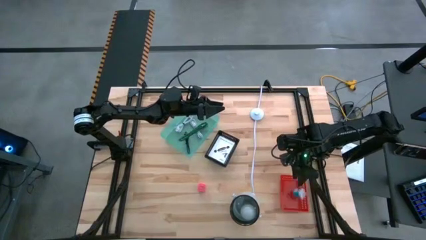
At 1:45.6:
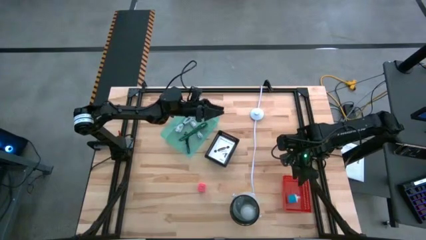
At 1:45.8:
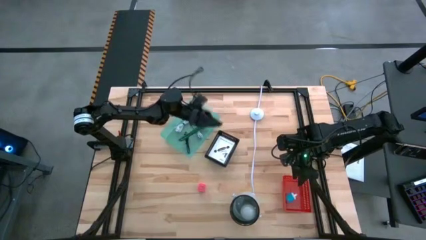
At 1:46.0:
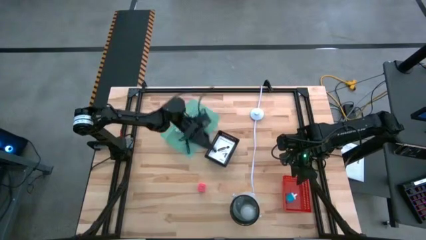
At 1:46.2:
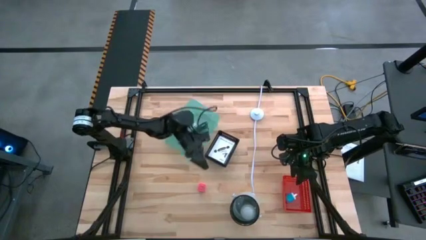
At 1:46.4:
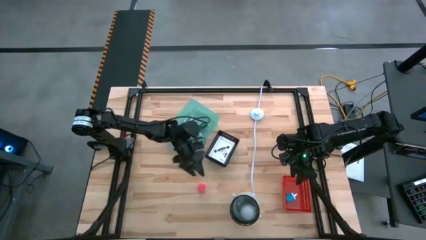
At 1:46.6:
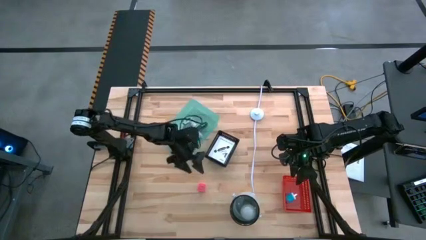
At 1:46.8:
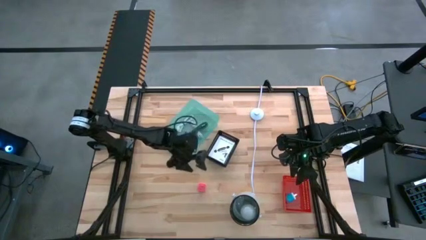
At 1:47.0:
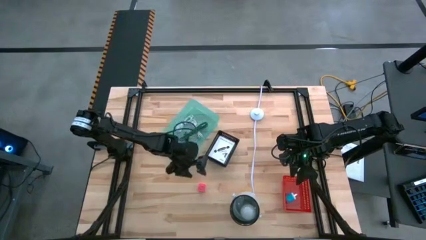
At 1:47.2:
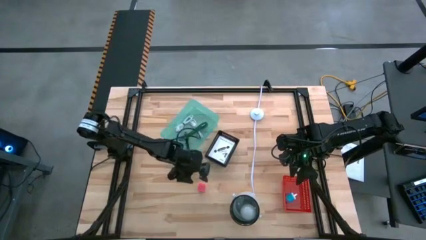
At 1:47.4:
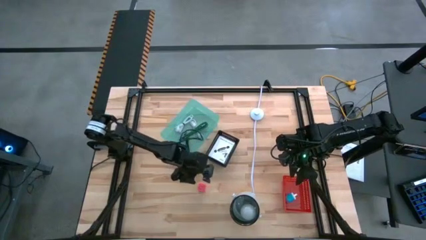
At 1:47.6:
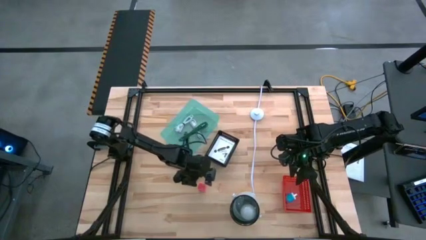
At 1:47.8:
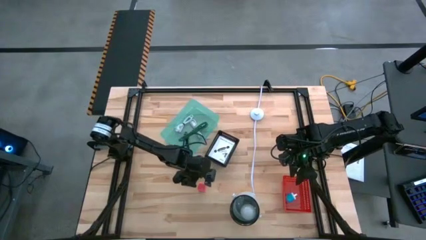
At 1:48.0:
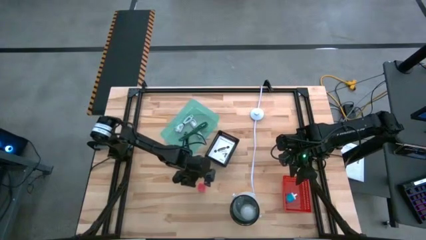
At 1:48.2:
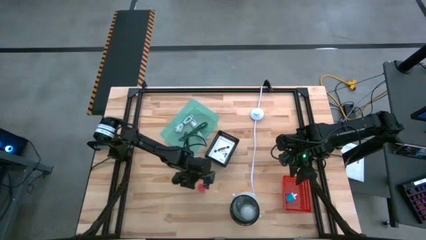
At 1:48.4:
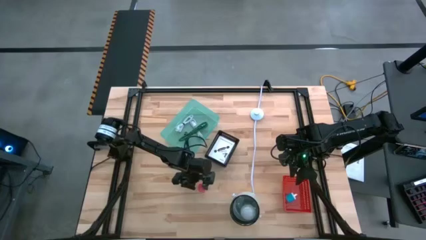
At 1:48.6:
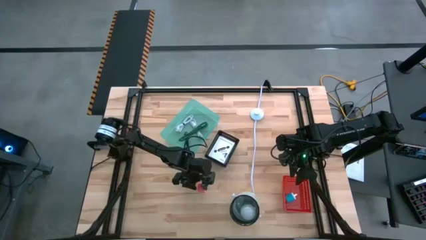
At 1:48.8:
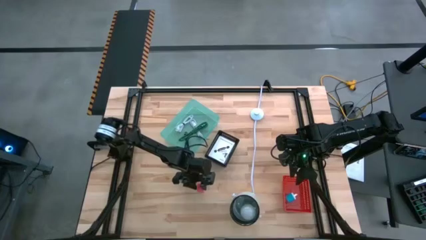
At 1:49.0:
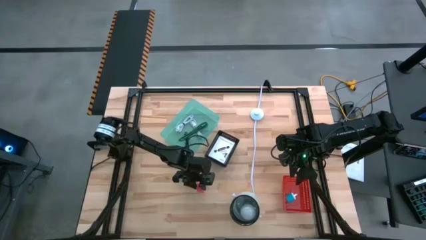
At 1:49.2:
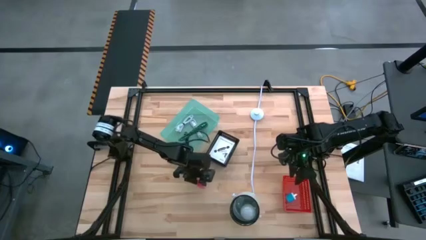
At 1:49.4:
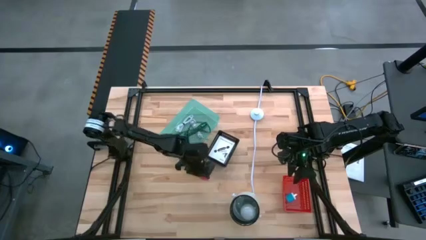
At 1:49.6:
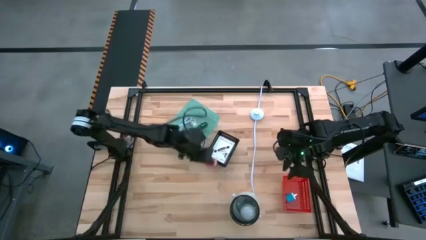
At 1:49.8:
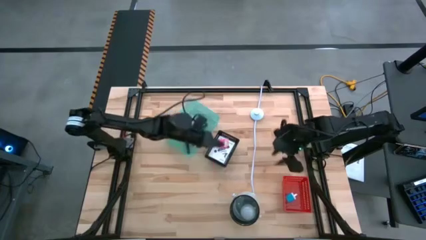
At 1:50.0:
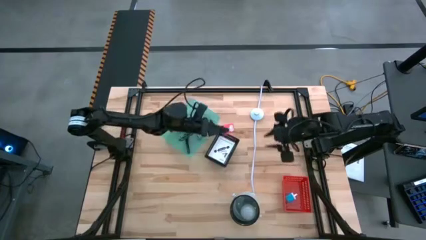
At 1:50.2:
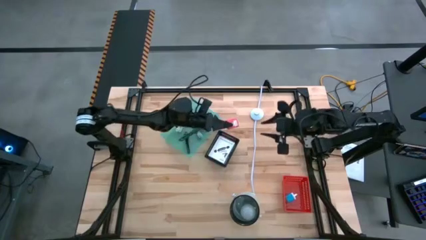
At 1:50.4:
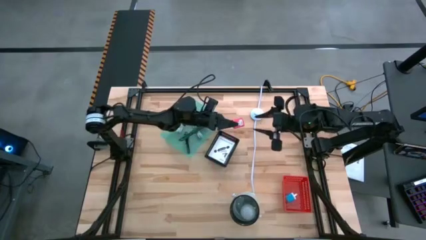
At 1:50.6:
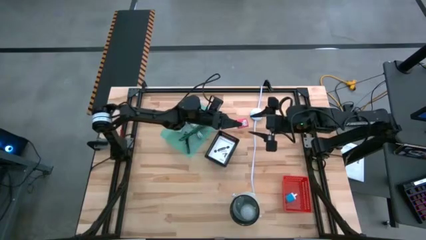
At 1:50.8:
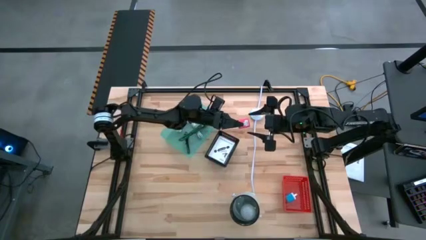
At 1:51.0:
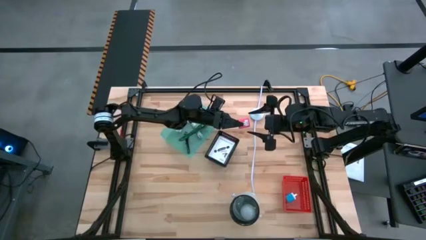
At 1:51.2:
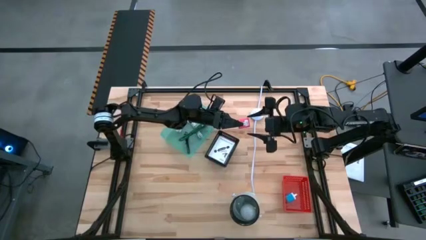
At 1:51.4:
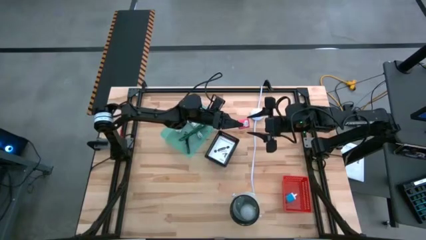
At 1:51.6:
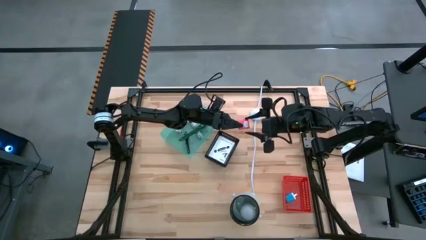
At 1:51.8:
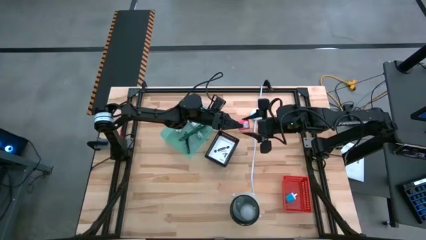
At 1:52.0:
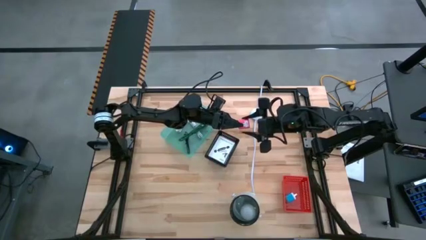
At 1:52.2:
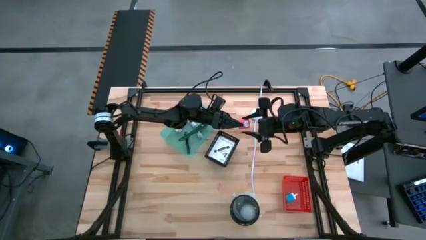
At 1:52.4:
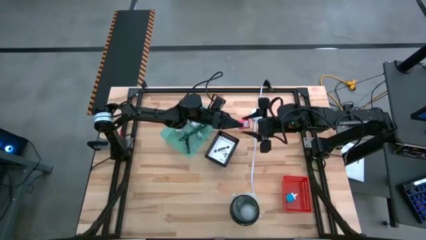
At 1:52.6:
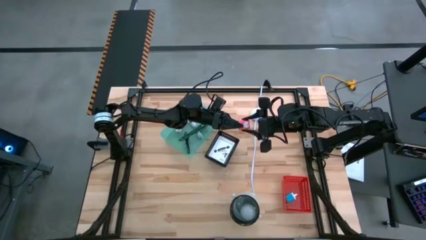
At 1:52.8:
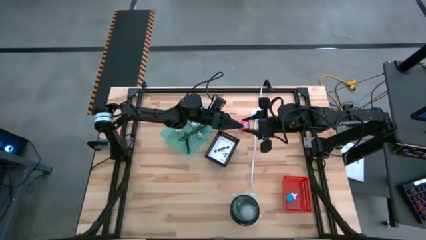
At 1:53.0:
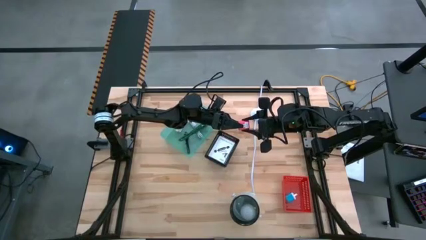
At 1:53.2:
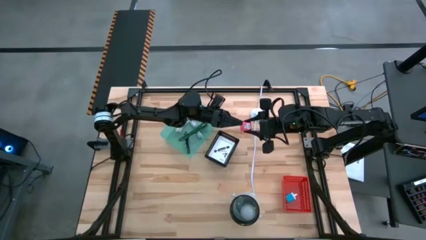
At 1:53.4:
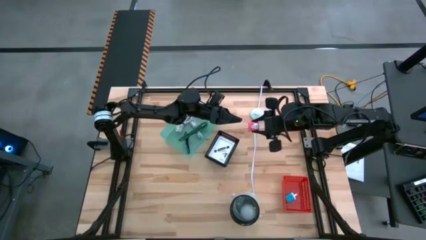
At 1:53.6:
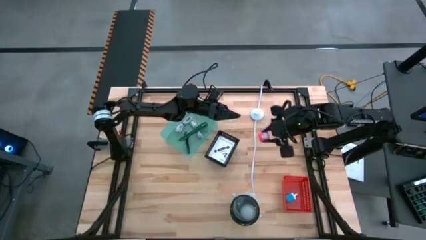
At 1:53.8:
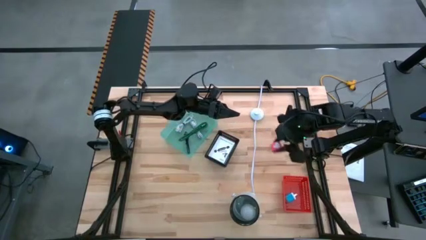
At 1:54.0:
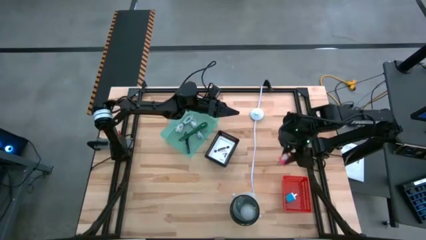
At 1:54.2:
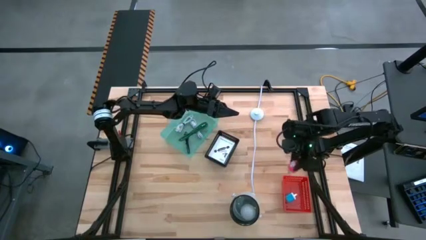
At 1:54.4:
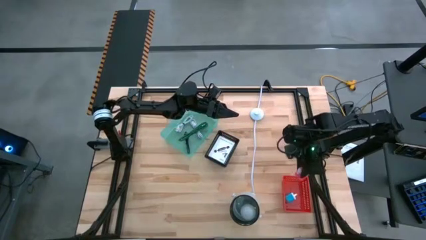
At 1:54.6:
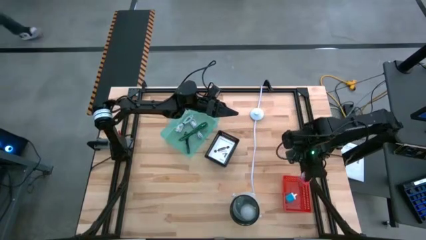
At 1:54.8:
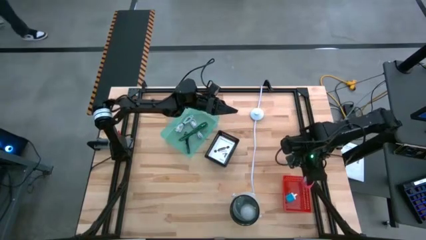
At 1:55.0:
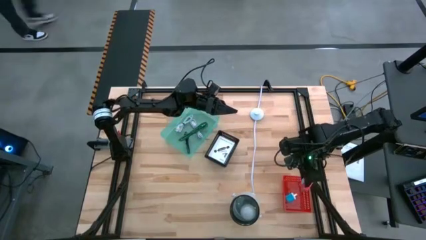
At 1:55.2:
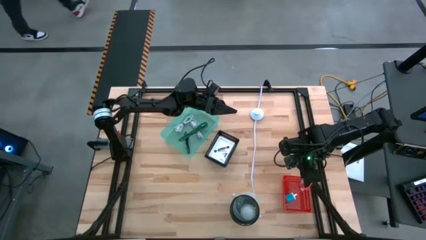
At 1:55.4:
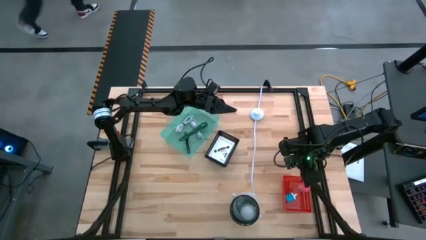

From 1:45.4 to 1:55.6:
Task: Pick and place items into bin
Put the red charger adaptor into the red bin

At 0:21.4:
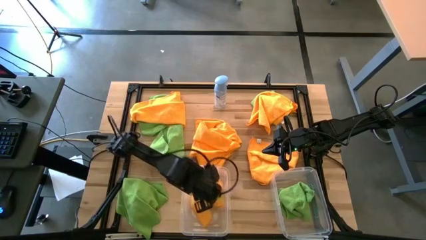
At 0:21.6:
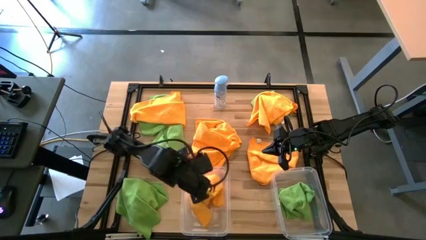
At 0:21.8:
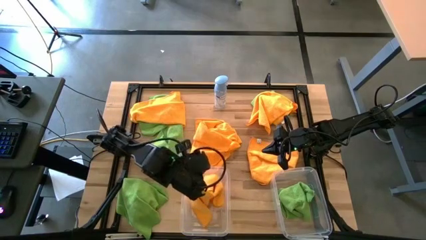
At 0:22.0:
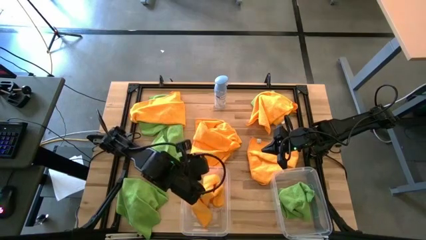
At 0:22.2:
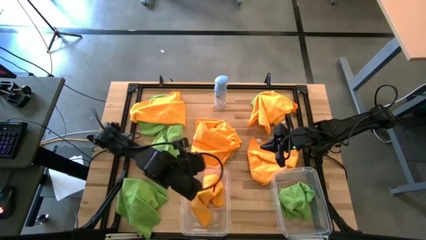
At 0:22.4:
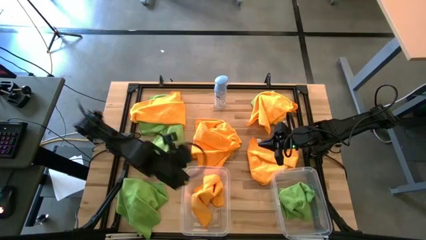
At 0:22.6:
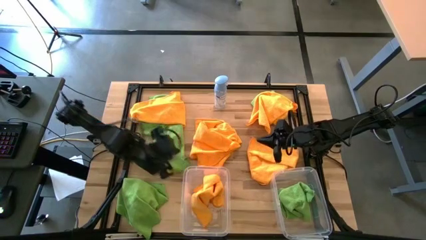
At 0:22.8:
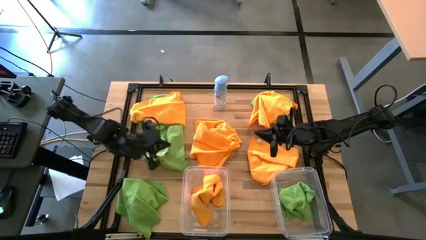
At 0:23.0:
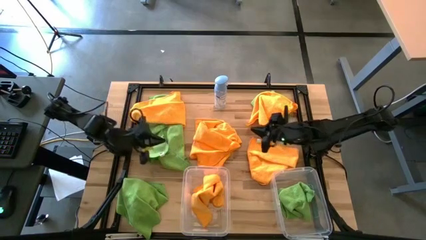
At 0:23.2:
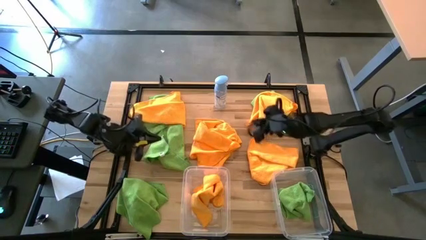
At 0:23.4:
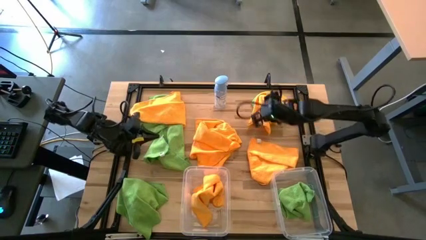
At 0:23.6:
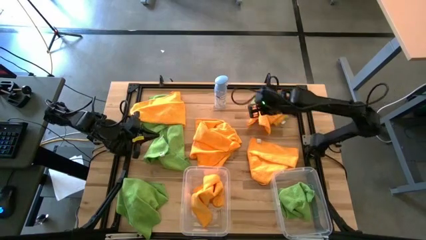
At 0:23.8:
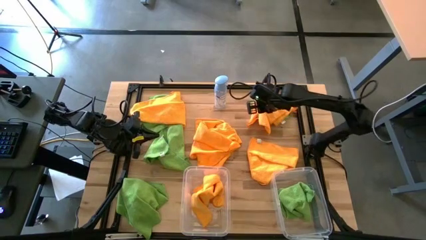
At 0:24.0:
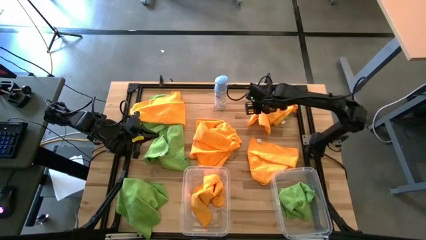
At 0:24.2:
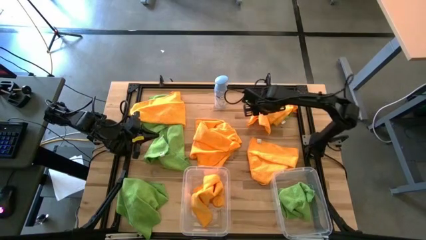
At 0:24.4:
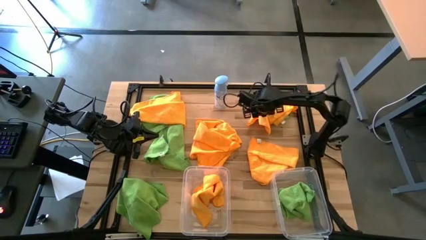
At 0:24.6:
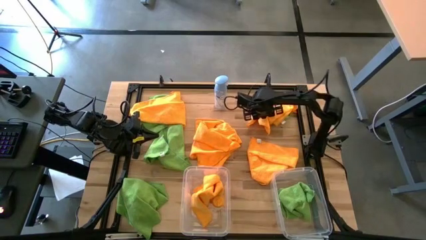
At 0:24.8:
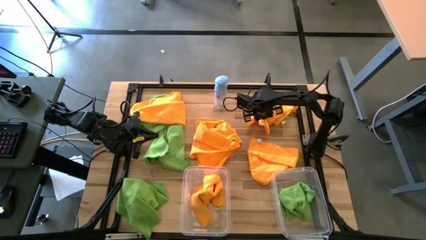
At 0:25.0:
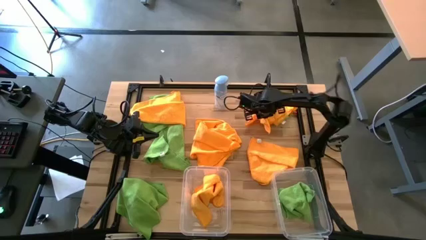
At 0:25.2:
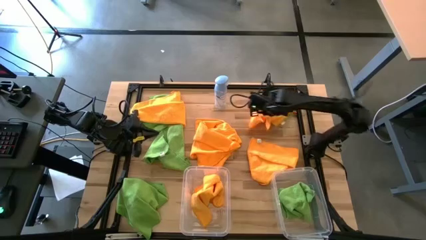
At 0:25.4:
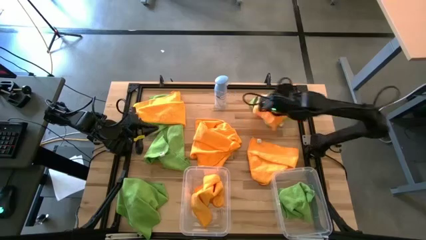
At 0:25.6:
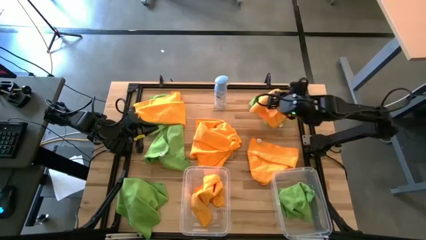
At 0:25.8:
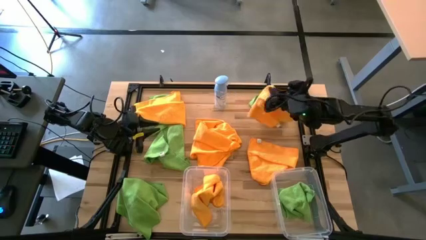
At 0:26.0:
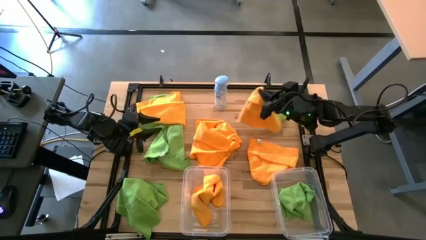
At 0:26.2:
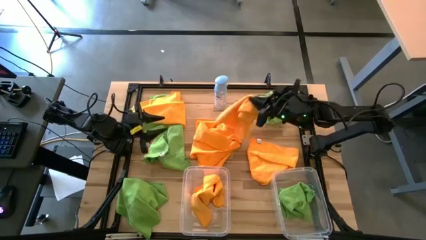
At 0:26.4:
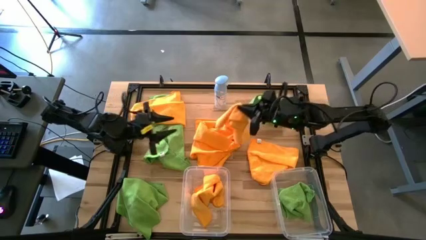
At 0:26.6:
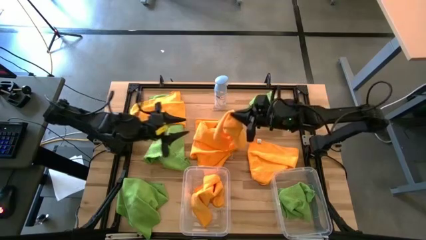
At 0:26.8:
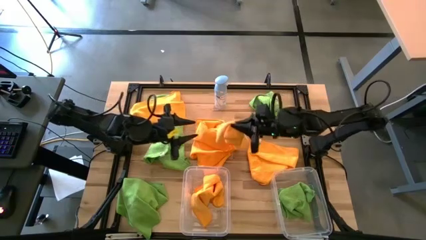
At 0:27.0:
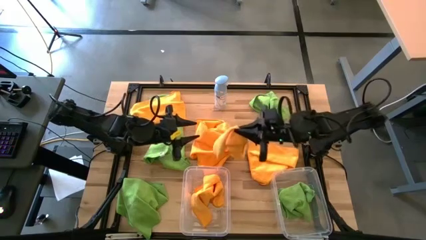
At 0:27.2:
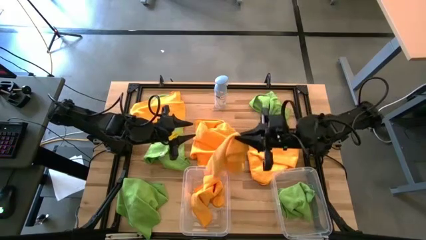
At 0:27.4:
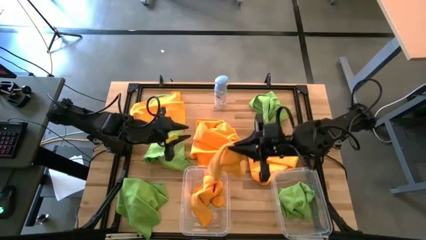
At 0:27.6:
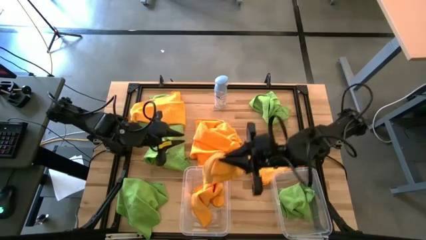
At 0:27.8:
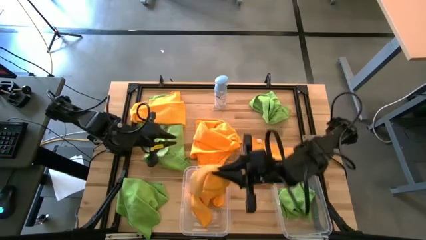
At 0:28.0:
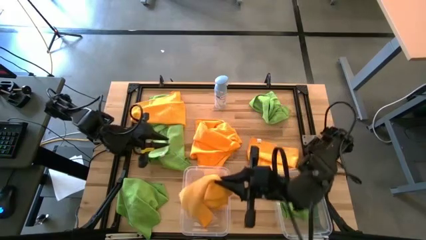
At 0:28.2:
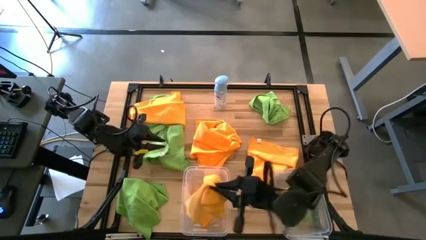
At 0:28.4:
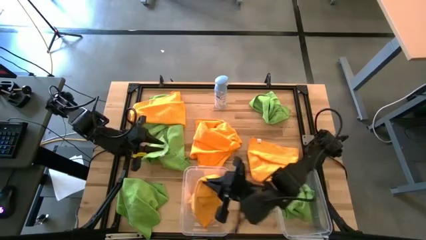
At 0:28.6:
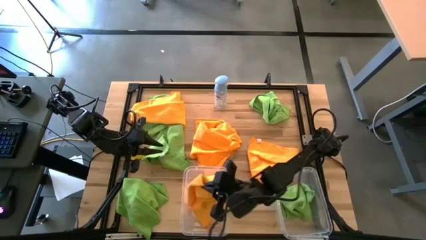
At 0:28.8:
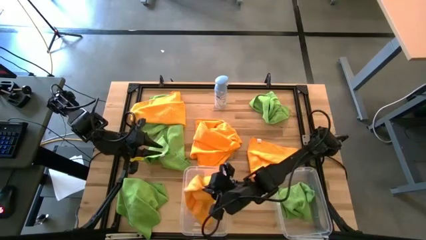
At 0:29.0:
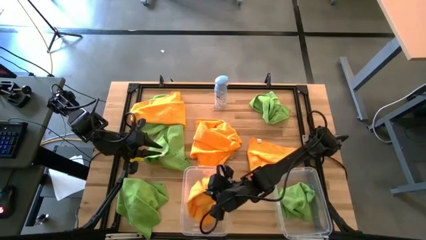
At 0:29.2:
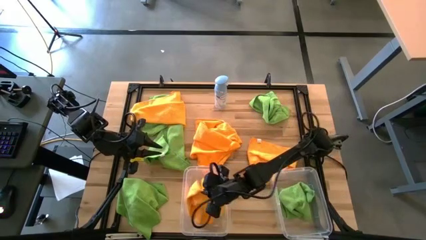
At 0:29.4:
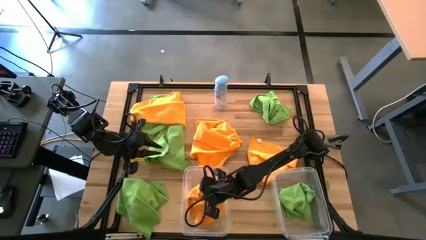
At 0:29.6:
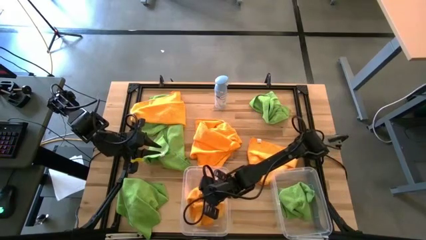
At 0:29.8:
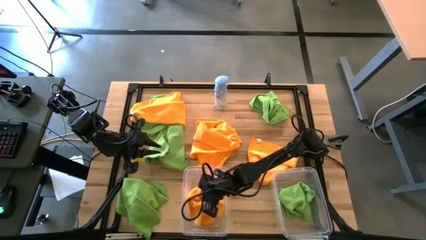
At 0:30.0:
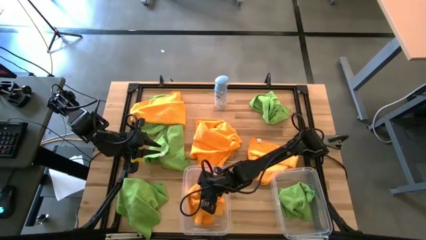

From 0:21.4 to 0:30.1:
Task: Sort microfiber towel by color & place in baskets
Put the yellow towel into the left transparent bin
